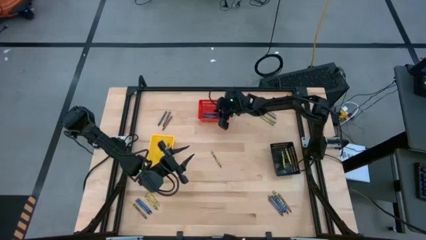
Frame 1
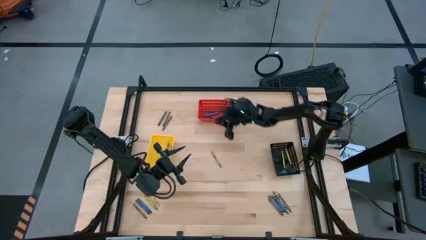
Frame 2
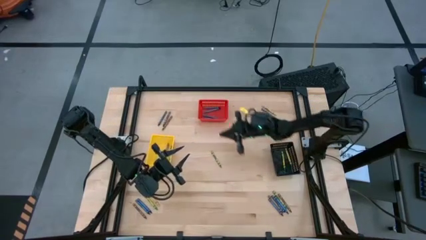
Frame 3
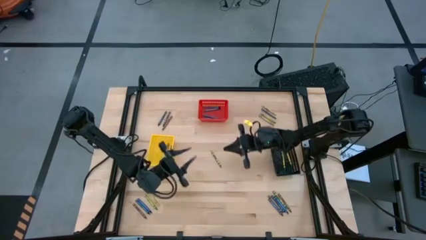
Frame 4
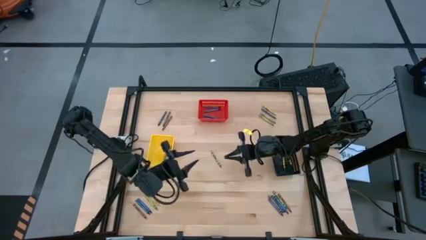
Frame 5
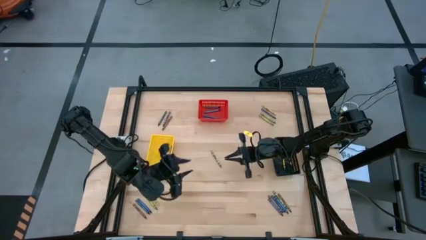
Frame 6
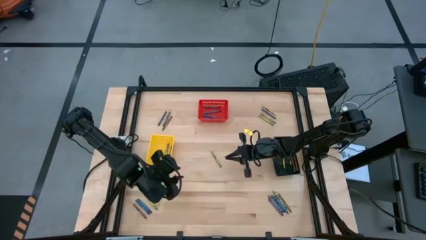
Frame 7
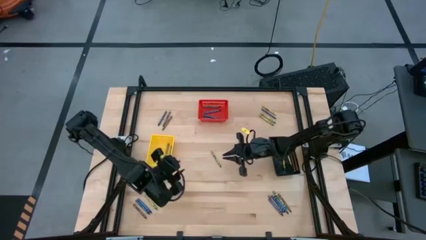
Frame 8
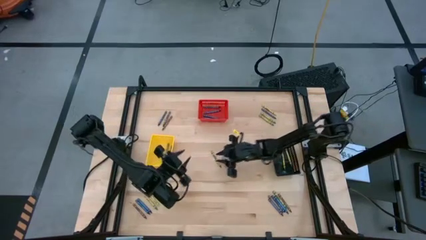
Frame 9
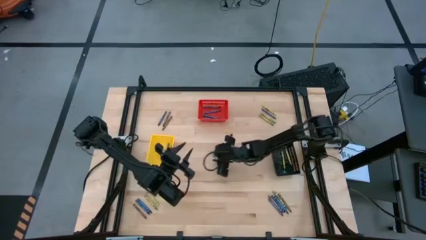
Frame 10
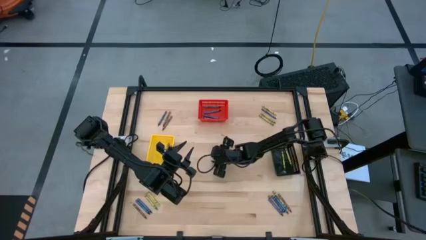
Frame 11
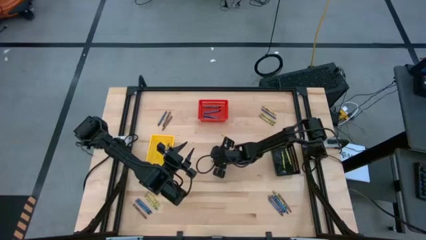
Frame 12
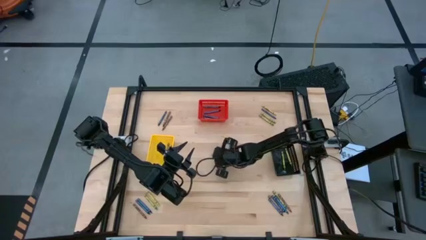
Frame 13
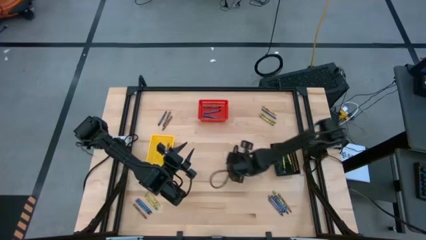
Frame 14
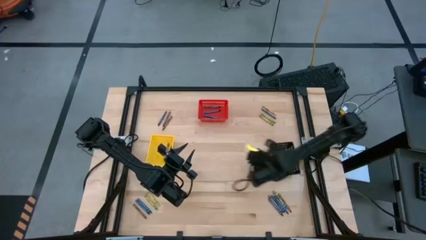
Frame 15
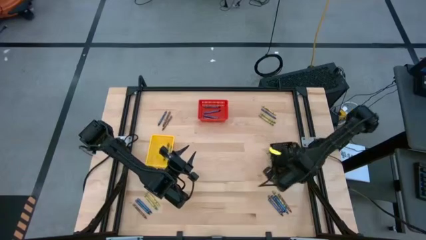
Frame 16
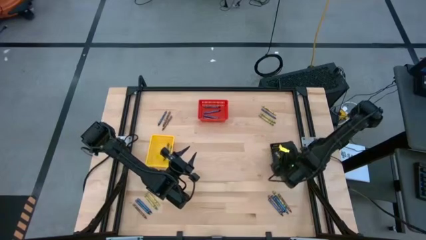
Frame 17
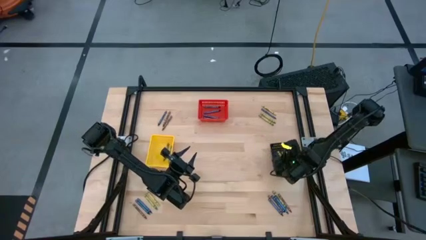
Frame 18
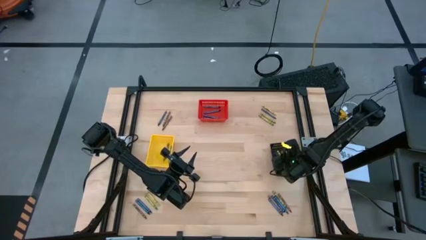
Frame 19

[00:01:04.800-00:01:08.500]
Task: Sort crayons
Put the green crayon into the black basket

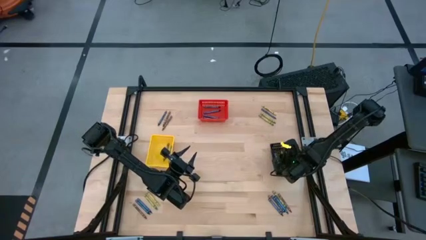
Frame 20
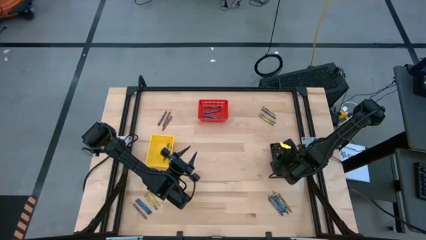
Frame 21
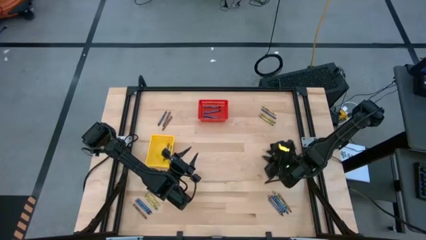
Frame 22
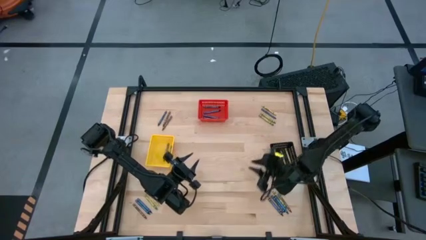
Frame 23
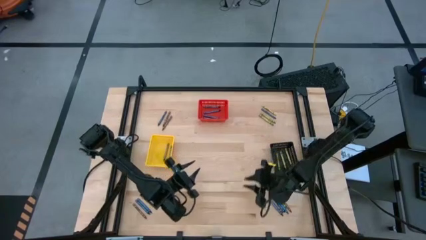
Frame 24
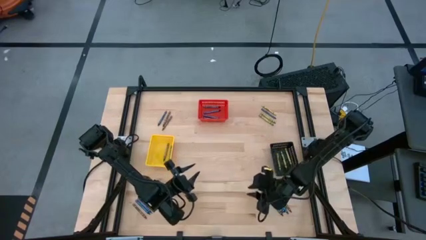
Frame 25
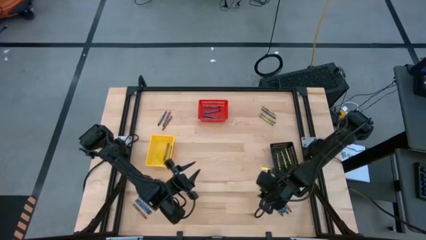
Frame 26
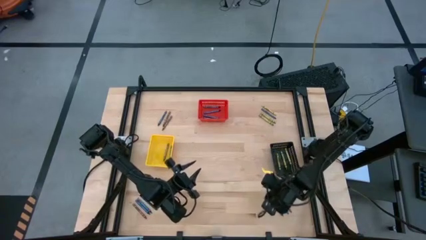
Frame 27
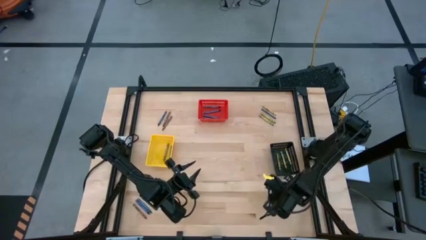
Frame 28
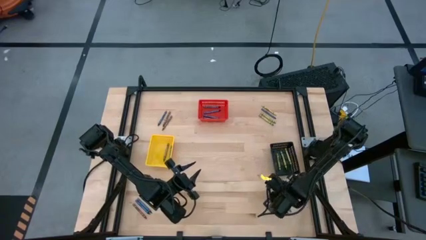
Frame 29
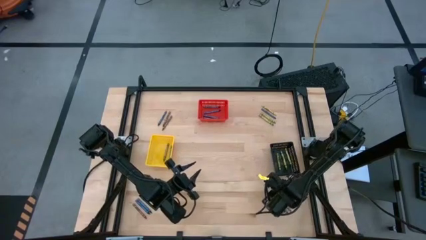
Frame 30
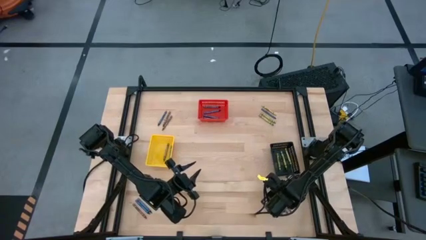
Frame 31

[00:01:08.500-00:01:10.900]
Put the green crayon into the black basket

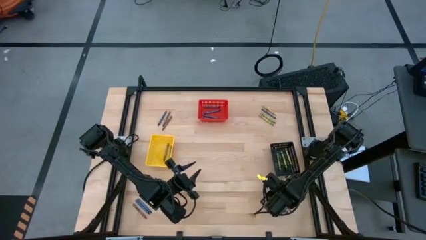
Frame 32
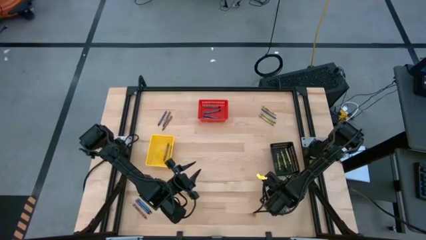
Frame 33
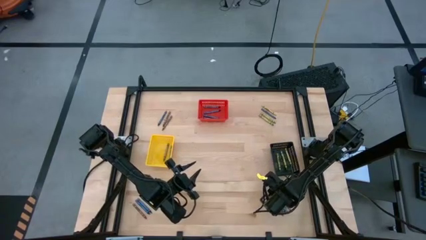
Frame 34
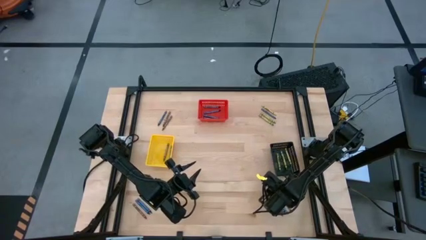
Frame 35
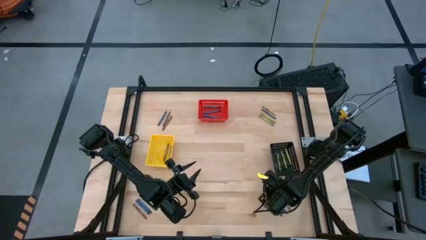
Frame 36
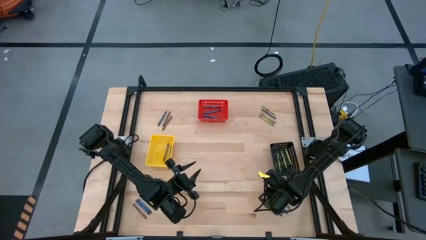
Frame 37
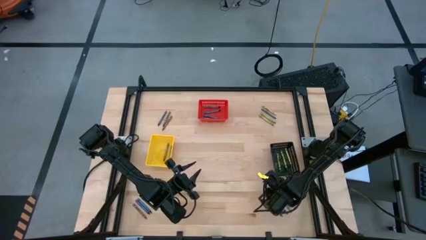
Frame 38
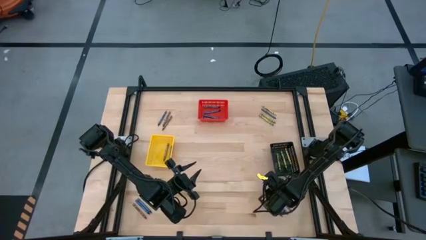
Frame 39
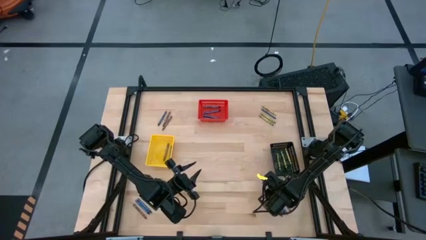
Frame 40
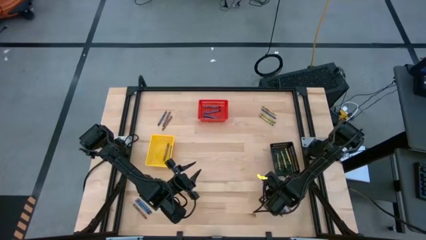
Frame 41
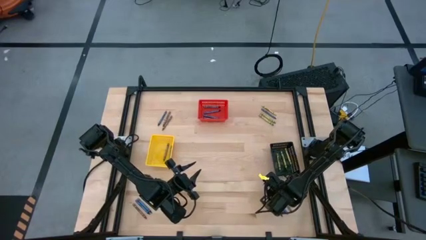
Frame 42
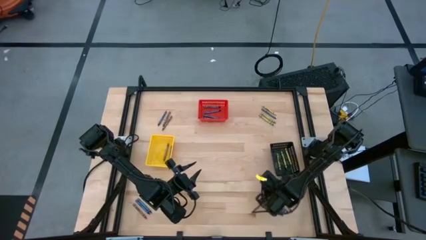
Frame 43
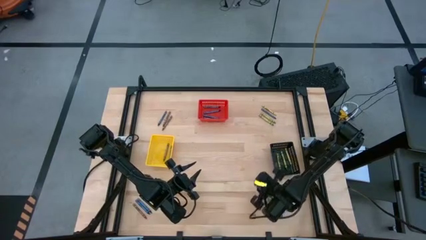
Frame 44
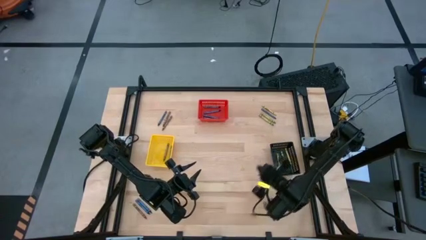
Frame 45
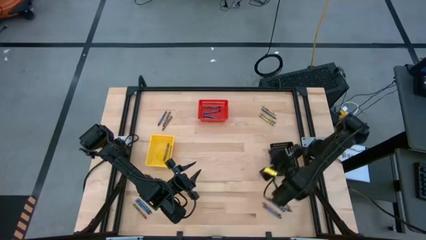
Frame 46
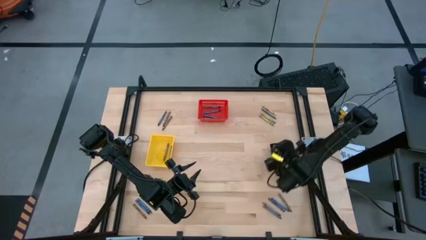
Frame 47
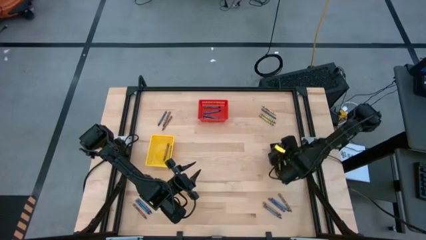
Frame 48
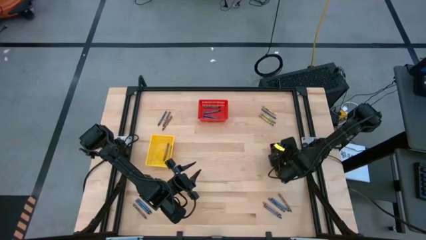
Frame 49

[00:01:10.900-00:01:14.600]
Put the green crayon into the black basket

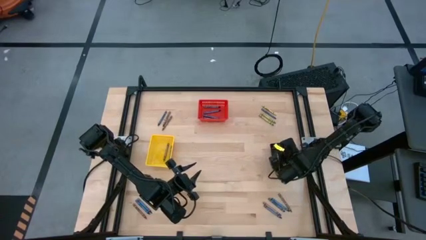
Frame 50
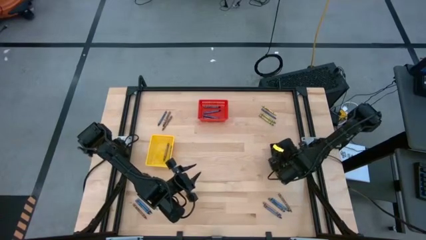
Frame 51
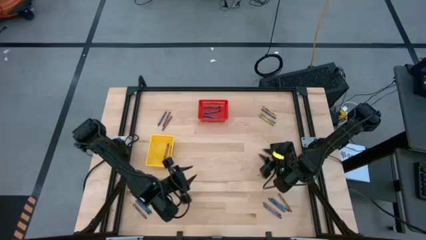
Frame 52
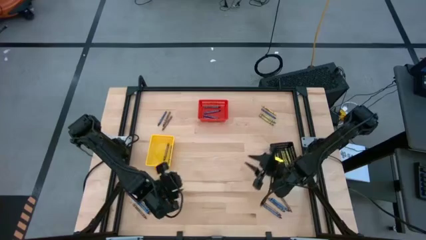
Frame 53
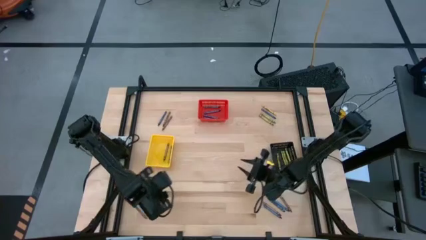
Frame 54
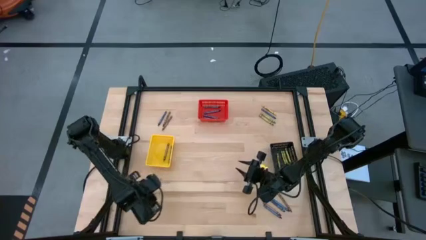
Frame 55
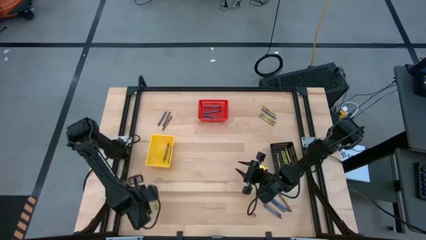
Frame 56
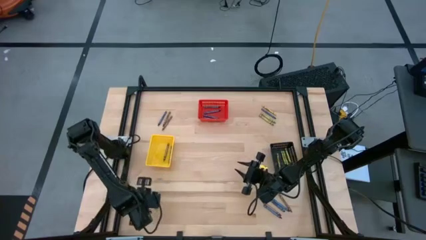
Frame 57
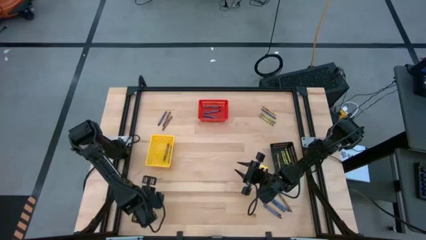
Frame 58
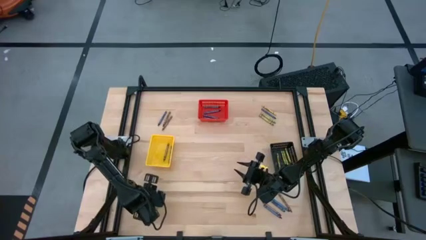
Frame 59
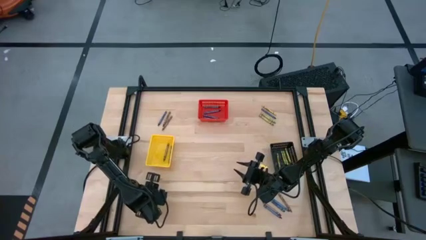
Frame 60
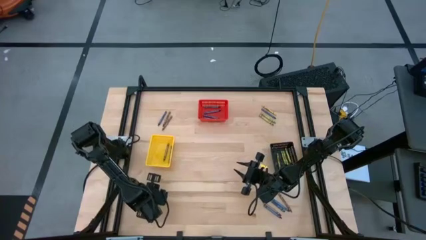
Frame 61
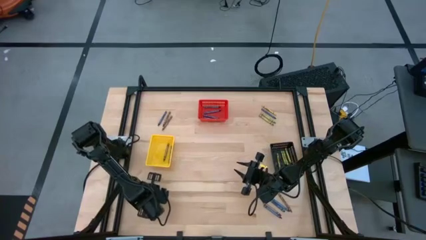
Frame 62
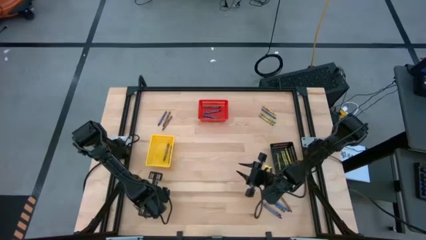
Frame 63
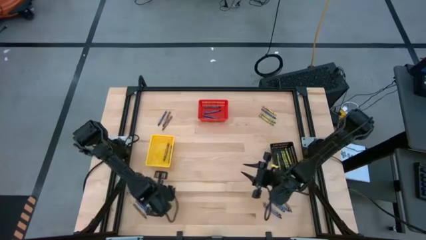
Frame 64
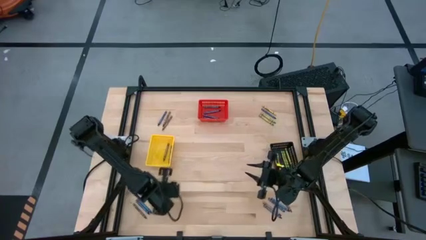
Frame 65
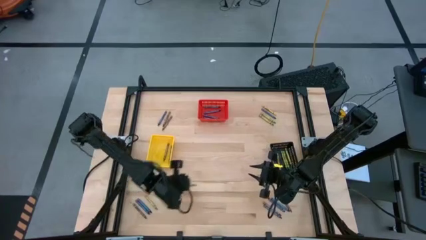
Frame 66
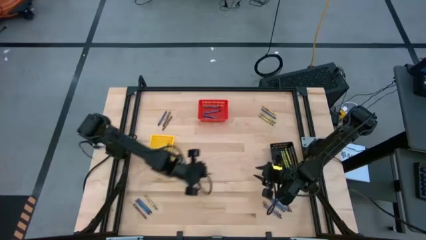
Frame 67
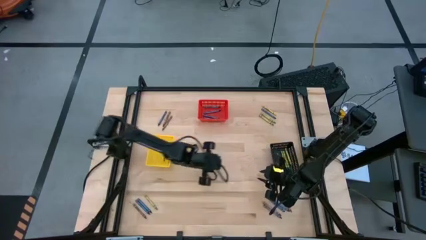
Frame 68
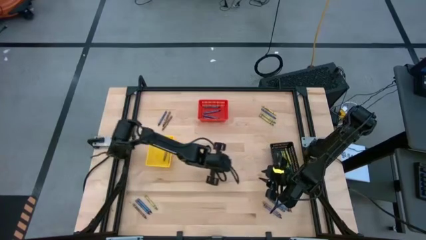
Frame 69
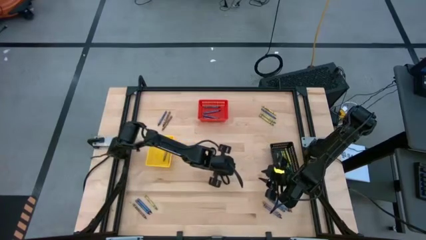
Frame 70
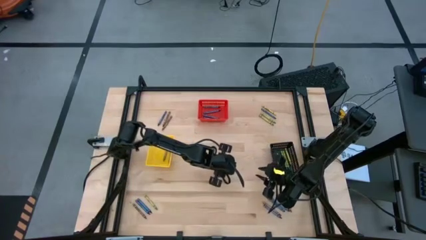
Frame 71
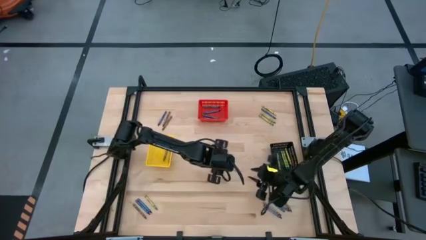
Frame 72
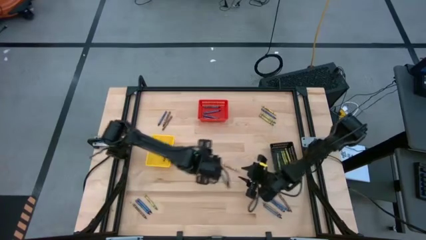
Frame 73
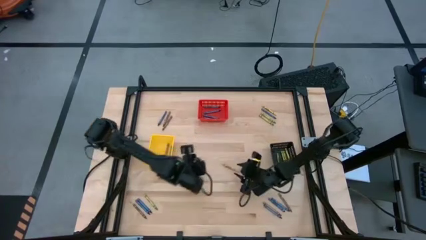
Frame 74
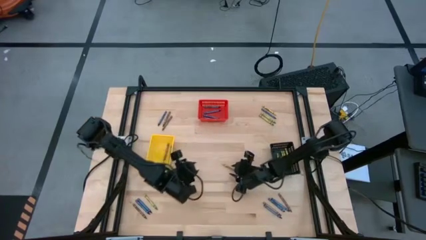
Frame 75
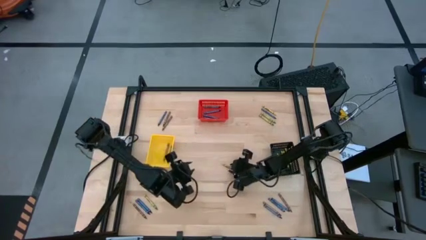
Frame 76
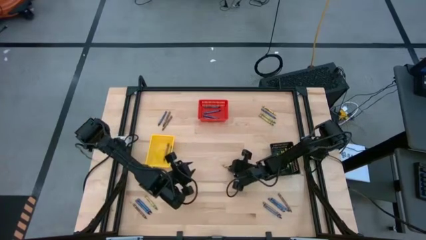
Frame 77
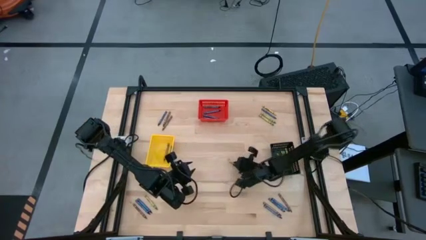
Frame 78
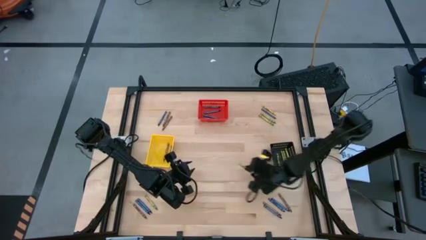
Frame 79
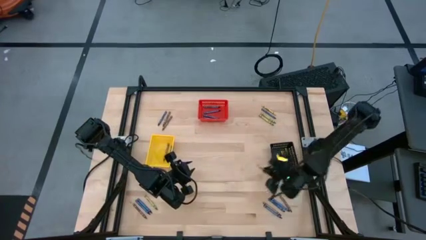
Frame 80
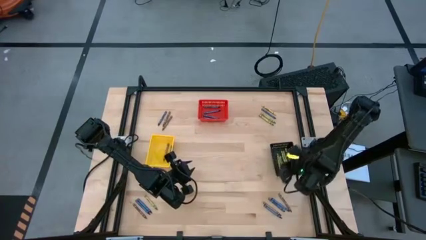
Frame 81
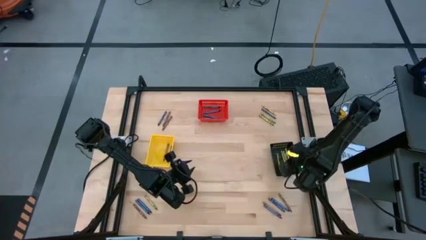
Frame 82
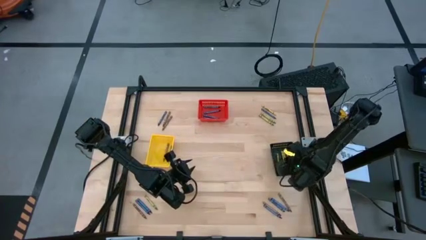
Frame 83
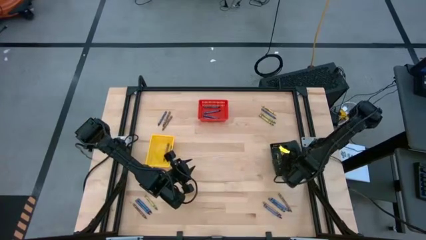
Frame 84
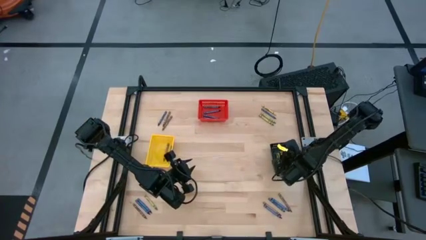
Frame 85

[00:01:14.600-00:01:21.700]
Put the green crayon into the black basket
